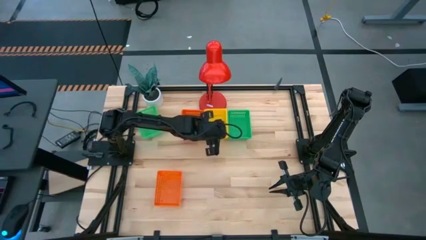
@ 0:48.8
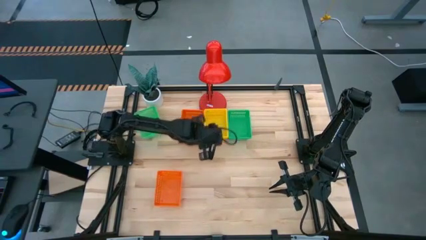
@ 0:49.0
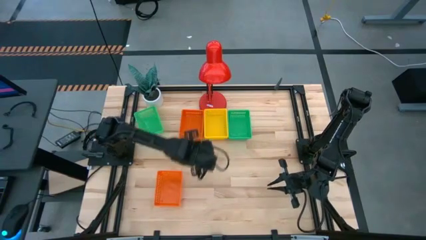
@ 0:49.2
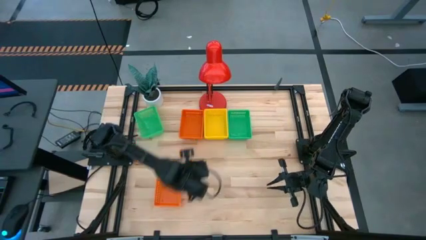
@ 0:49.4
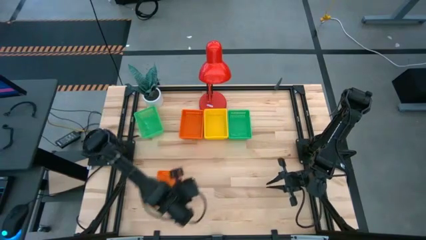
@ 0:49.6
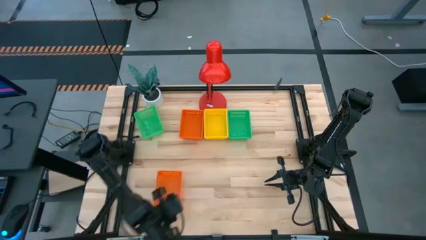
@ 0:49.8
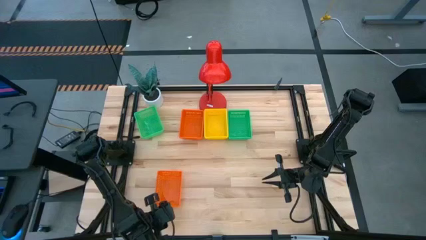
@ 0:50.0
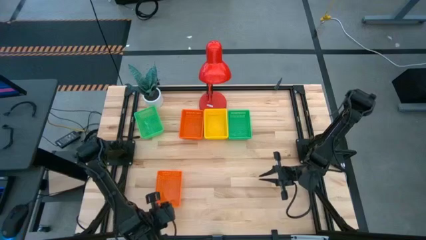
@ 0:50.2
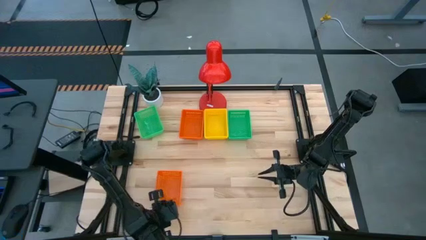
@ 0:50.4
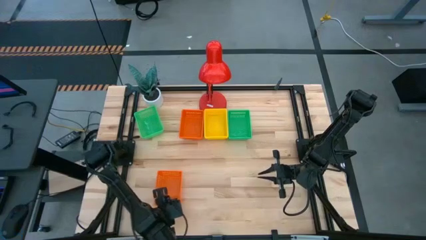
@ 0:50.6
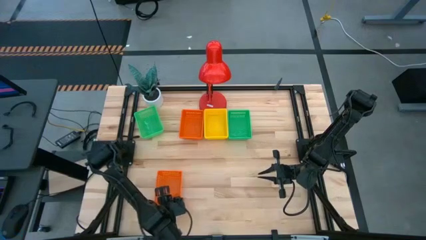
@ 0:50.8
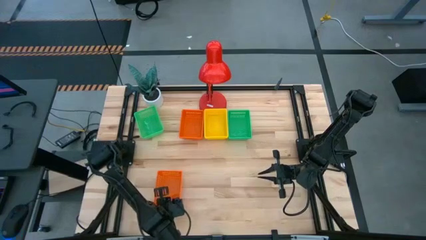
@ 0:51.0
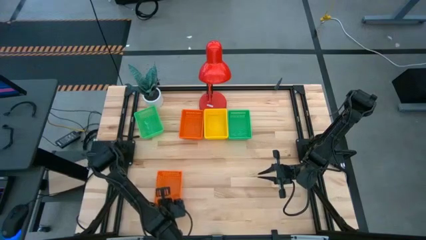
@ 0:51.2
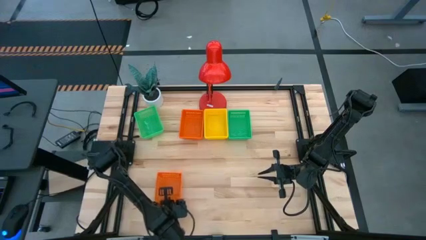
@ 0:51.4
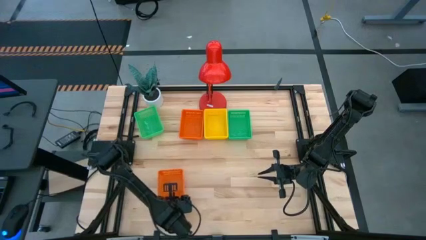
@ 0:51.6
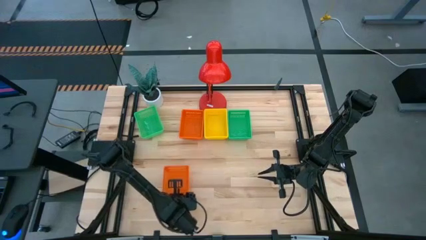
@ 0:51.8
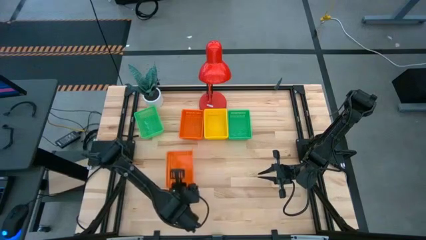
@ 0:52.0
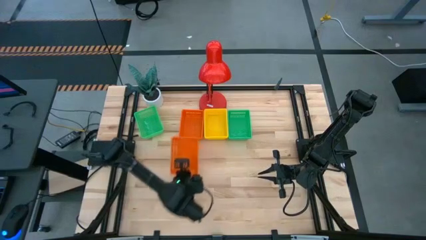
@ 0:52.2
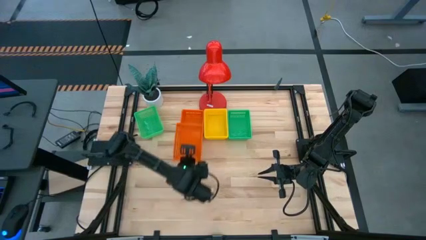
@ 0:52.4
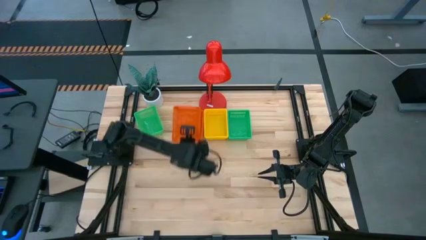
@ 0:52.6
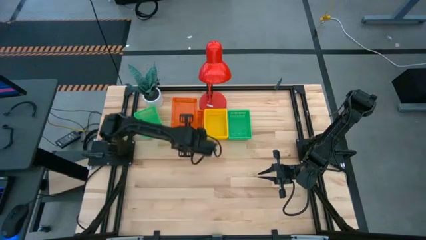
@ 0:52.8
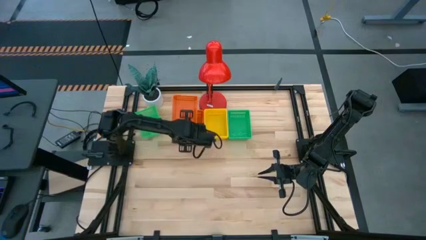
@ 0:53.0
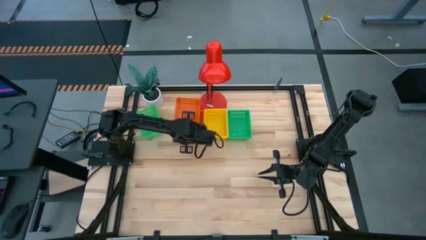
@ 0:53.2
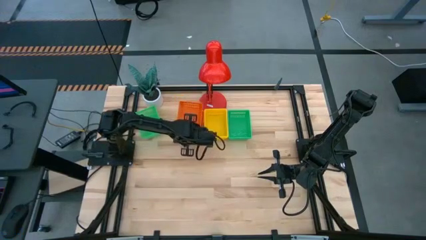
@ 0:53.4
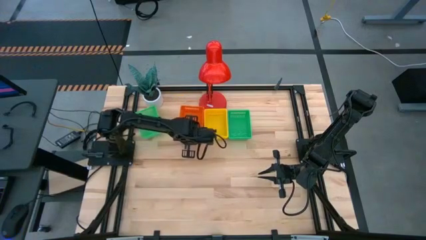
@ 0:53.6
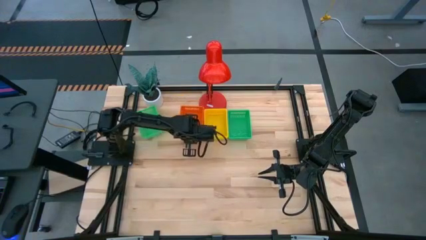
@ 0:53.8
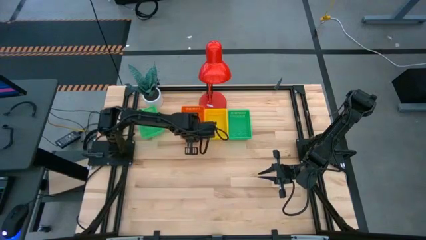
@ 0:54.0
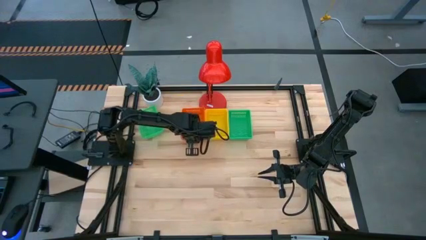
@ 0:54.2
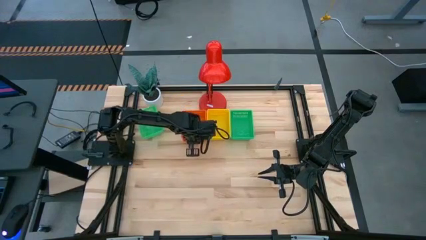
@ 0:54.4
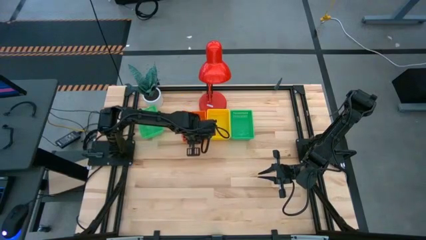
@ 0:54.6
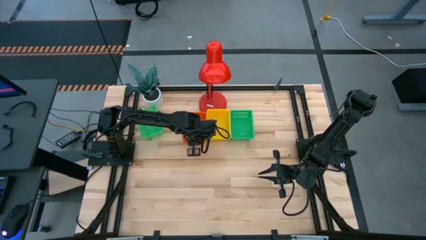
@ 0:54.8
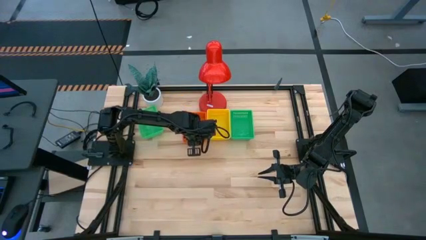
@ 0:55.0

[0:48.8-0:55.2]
Stack the bottom orange bin on top of the top orange bin

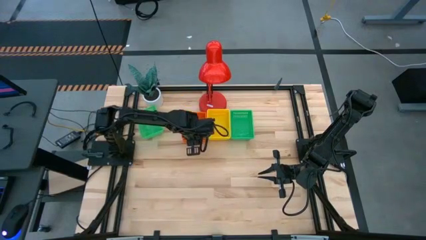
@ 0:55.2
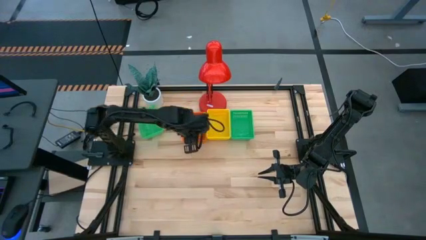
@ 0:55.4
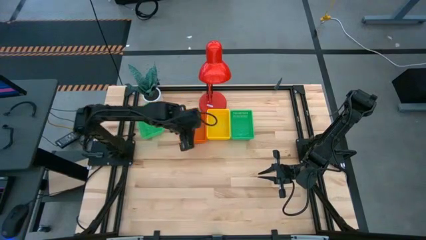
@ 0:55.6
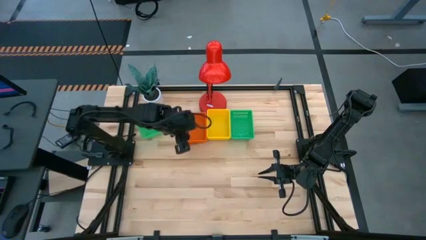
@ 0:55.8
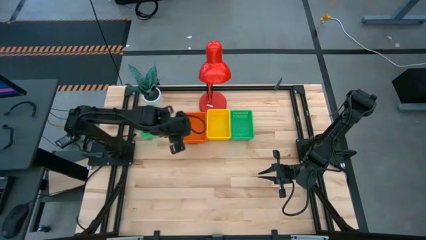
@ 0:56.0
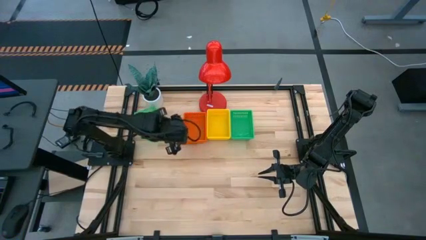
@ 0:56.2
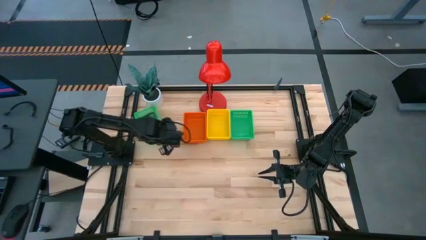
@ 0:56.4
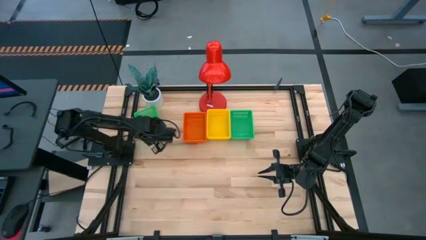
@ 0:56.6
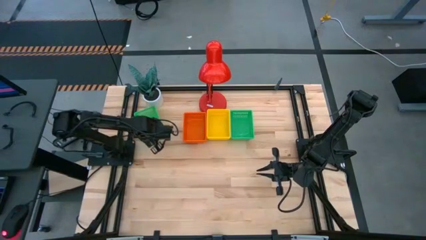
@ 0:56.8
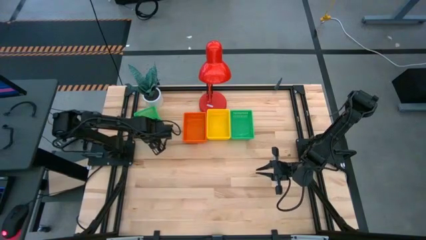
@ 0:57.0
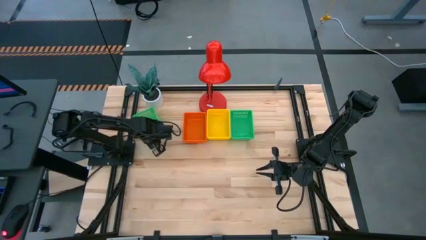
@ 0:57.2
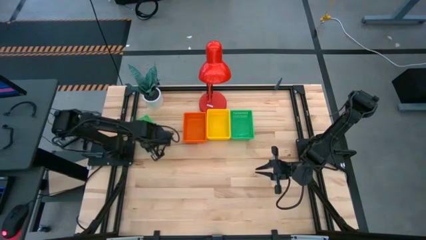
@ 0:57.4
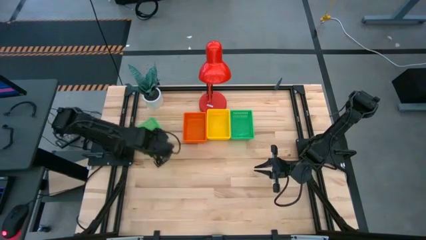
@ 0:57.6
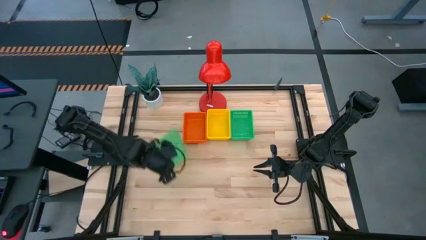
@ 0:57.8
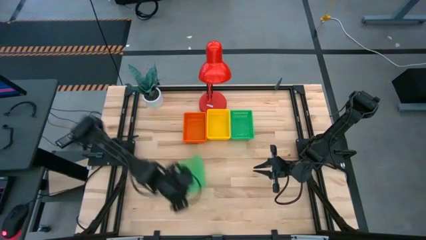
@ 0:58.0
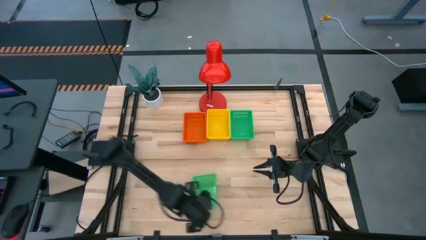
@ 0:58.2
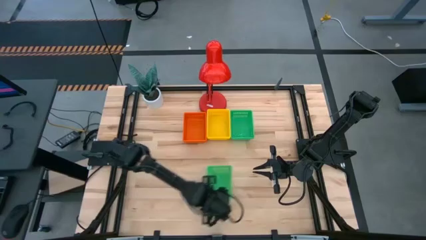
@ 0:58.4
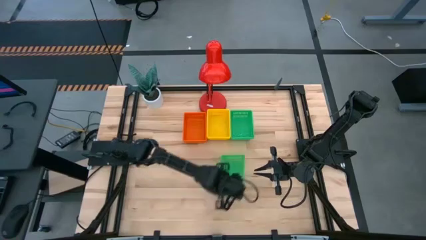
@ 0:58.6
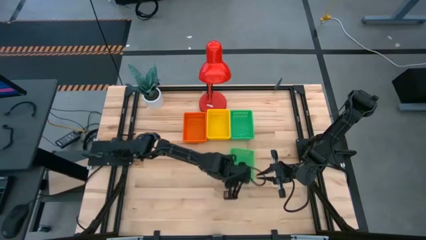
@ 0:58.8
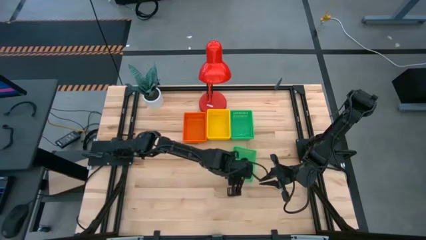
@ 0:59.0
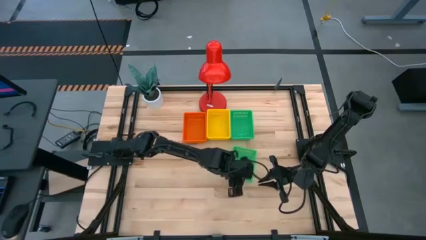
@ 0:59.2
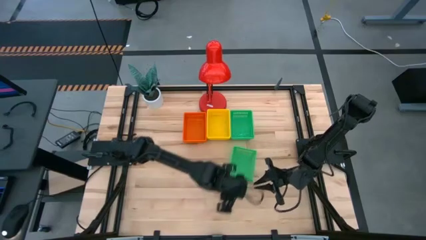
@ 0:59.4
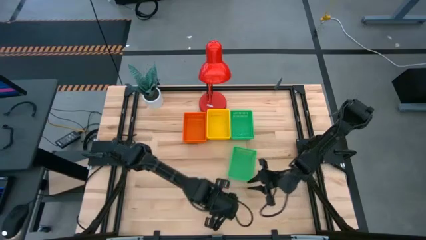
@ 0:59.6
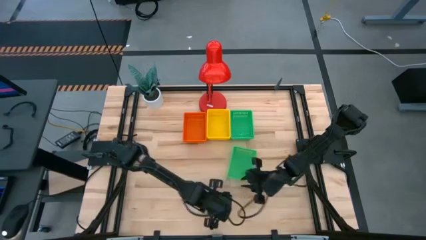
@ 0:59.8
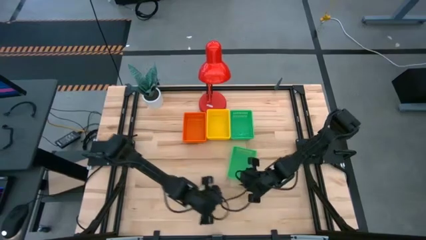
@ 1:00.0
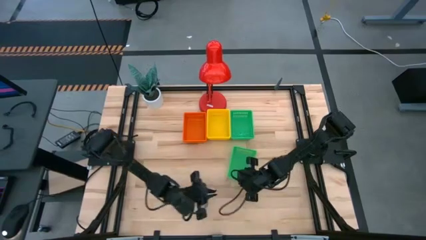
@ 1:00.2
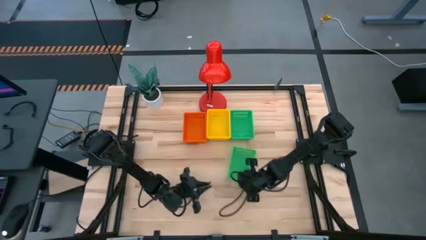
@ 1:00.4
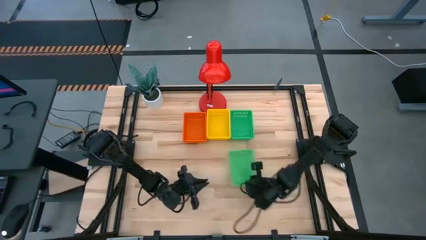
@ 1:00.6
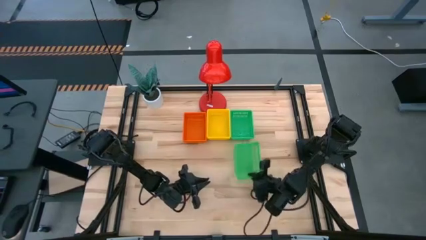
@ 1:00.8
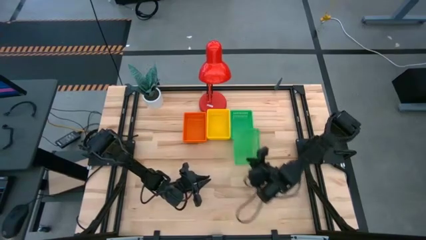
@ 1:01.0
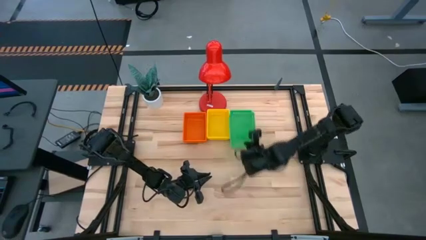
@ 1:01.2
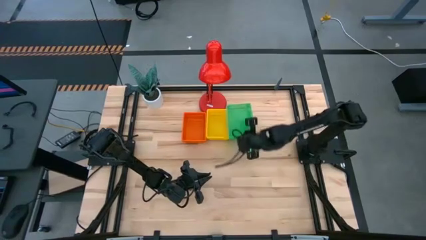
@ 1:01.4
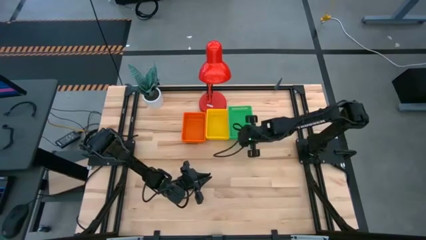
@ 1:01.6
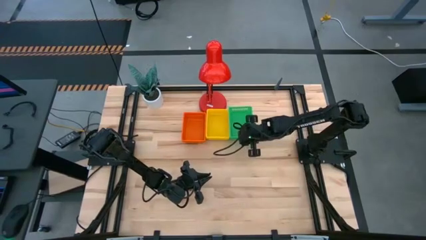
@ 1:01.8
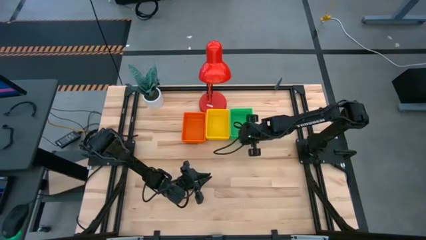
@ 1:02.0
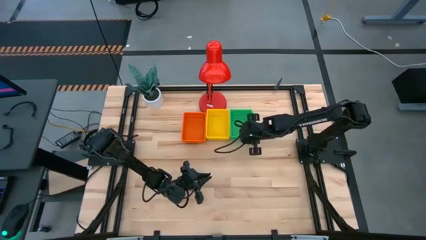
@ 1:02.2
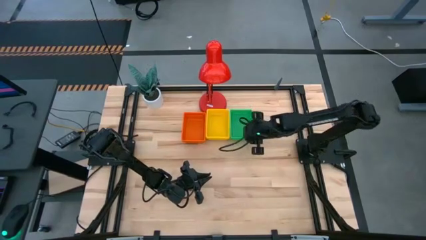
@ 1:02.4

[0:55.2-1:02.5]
Stack the left green bin on top of the right green bin

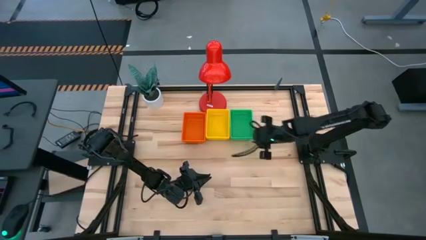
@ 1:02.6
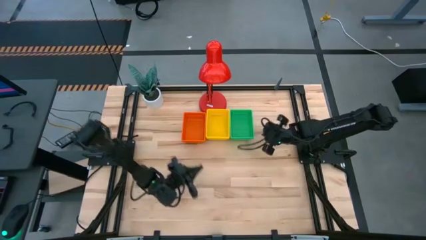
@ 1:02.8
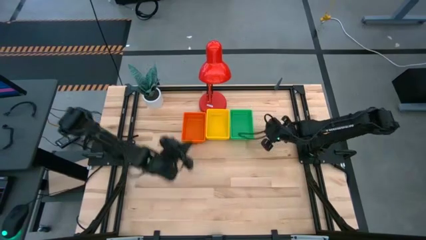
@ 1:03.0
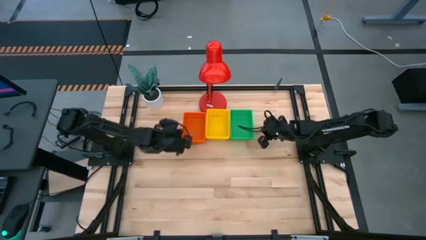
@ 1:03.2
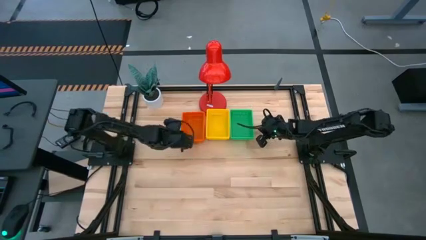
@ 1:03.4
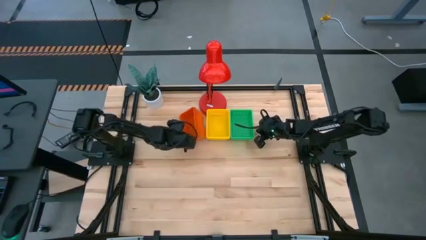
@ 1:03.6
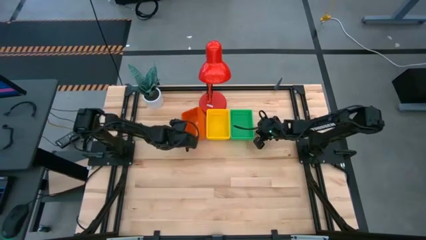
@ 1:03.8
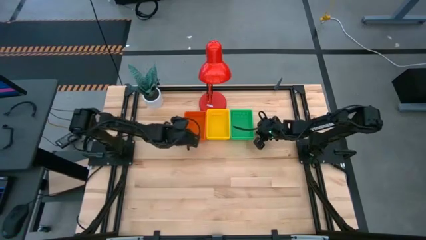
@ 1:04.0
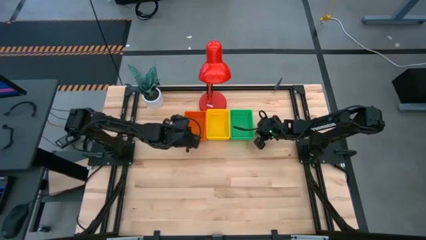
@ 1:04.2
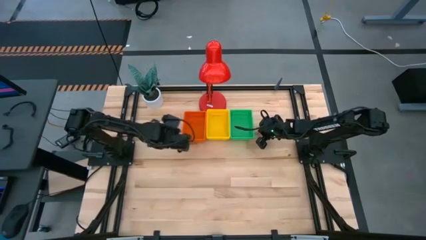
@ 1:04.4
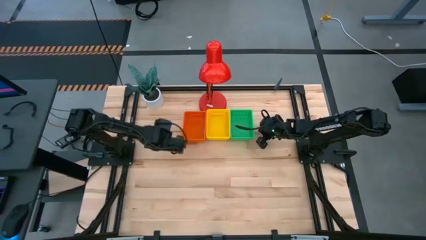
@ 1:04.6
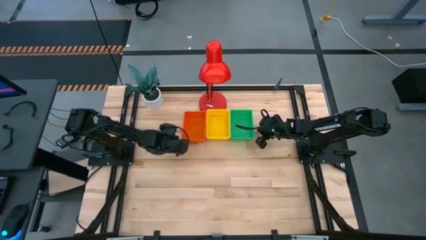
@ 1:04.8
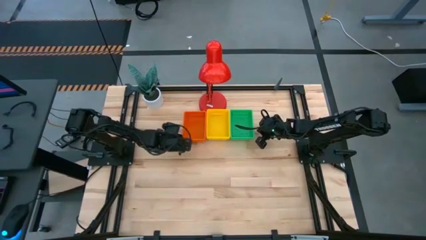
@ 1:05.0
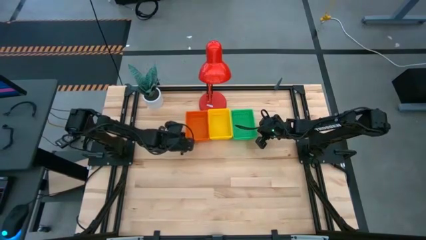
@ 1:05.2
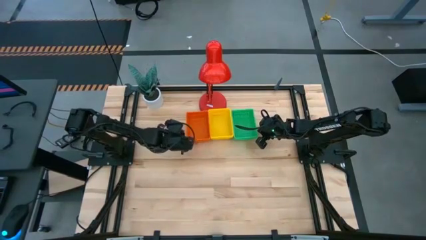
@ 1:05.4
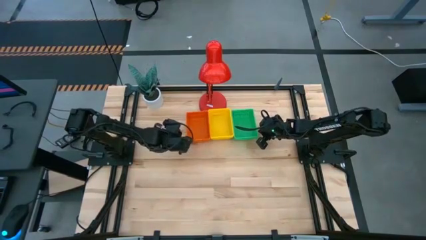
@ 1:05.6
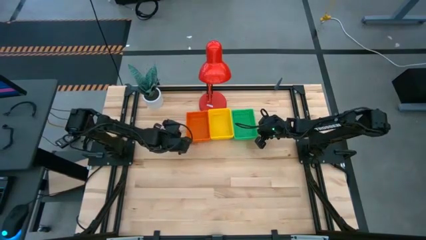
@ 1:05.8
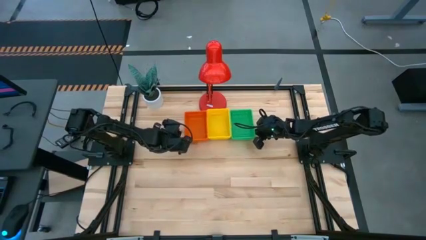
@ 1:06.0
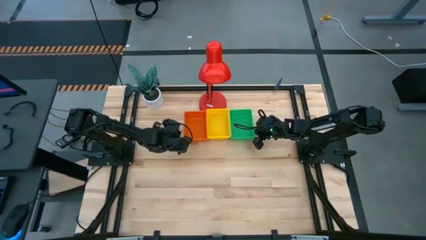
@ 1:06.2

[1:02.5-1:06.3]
Adjust the stacked bins
